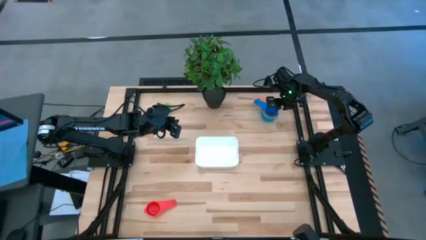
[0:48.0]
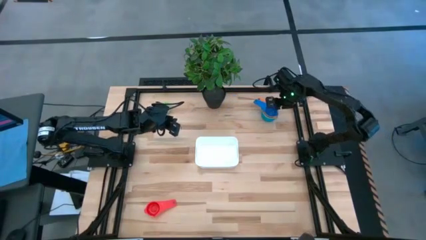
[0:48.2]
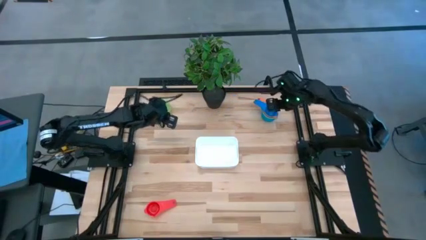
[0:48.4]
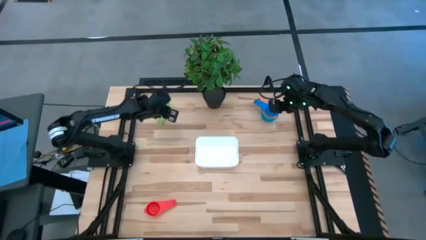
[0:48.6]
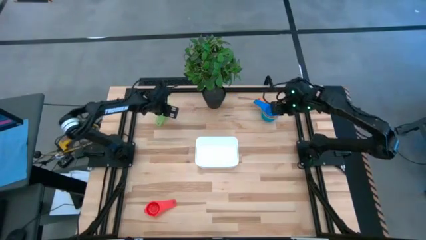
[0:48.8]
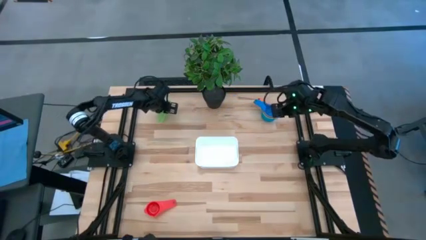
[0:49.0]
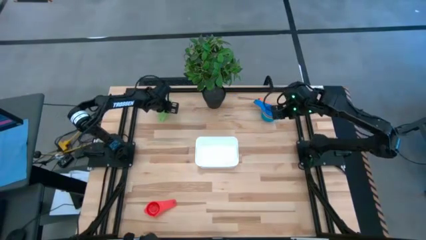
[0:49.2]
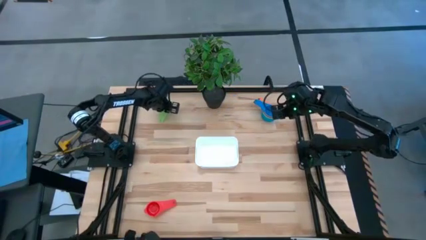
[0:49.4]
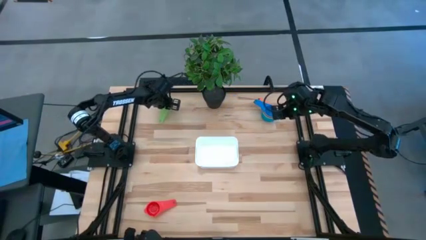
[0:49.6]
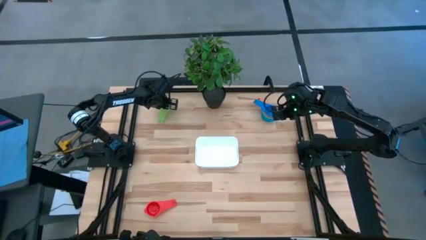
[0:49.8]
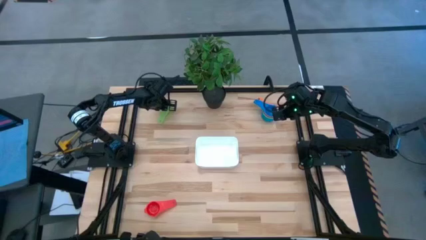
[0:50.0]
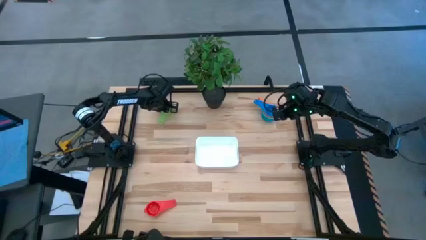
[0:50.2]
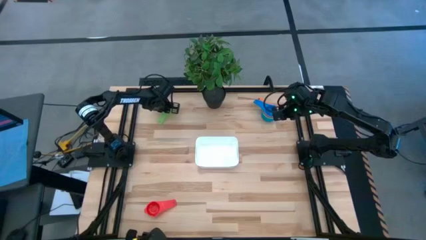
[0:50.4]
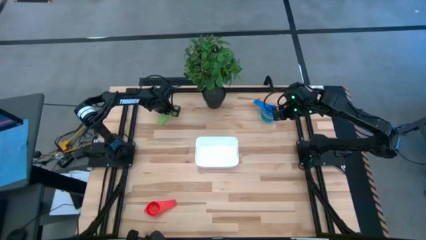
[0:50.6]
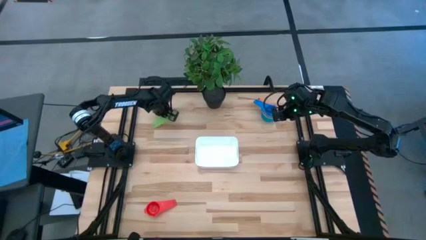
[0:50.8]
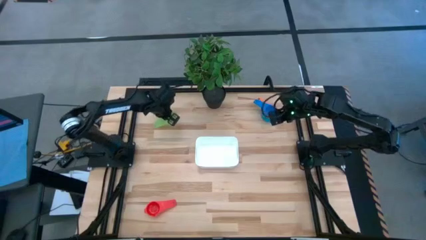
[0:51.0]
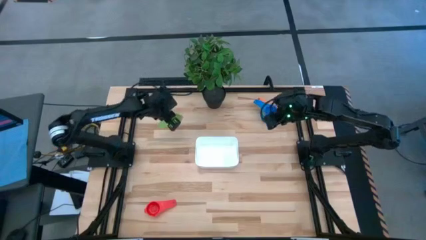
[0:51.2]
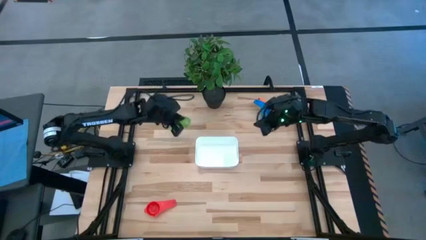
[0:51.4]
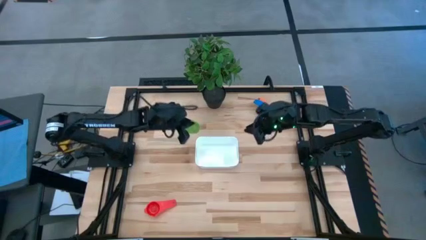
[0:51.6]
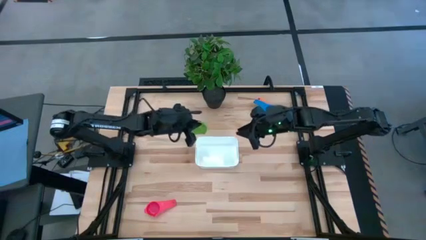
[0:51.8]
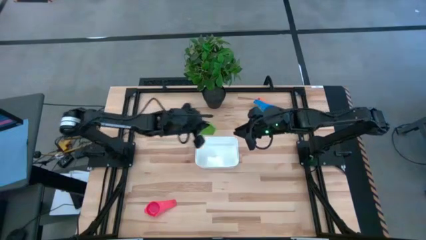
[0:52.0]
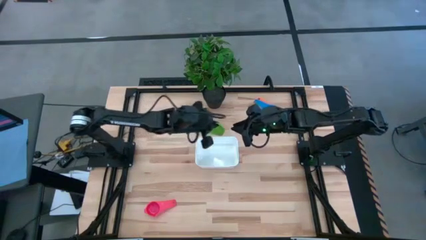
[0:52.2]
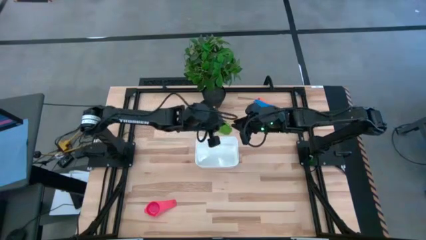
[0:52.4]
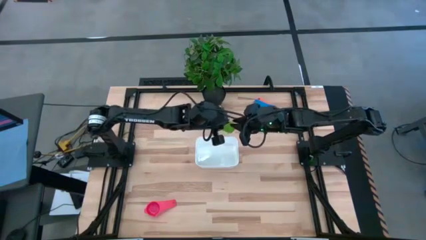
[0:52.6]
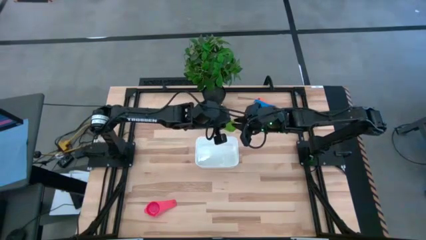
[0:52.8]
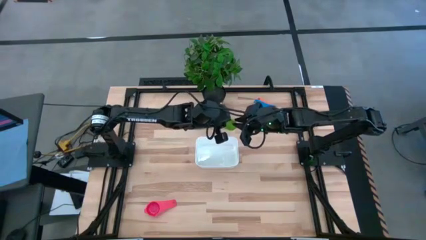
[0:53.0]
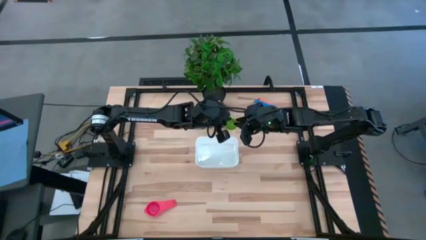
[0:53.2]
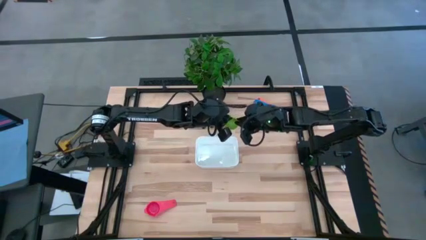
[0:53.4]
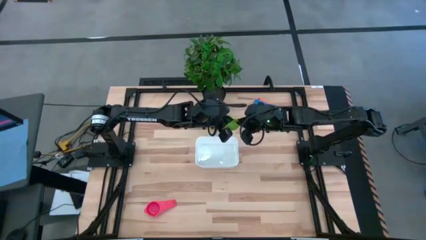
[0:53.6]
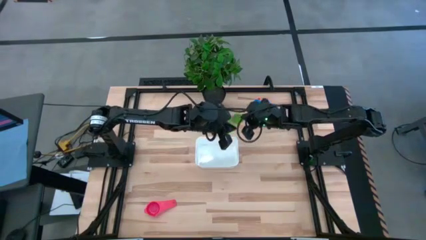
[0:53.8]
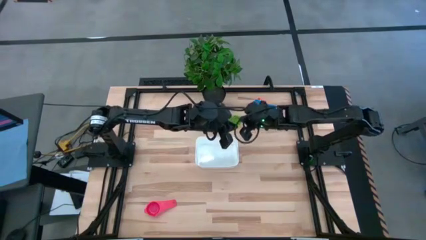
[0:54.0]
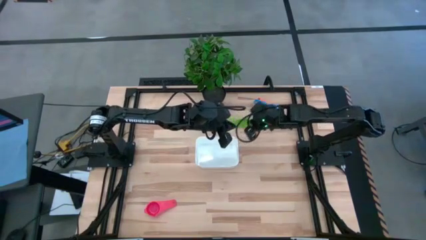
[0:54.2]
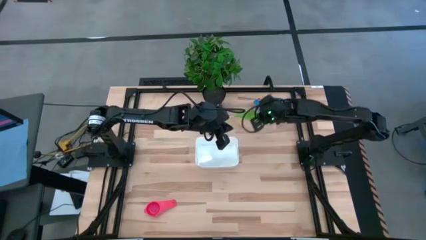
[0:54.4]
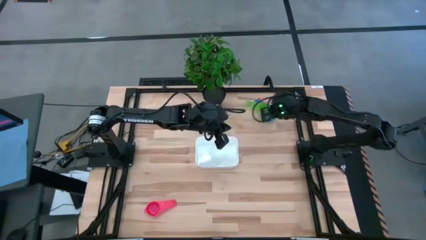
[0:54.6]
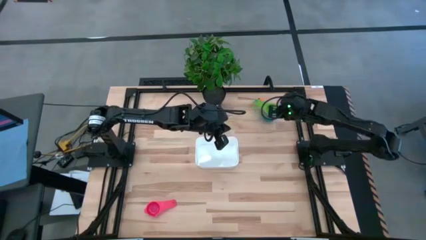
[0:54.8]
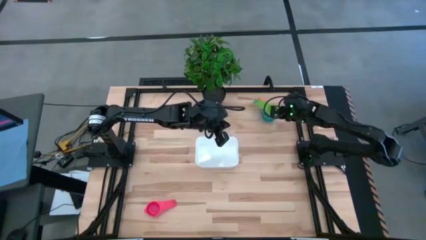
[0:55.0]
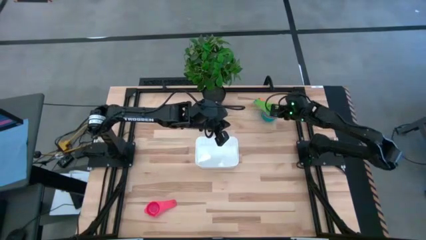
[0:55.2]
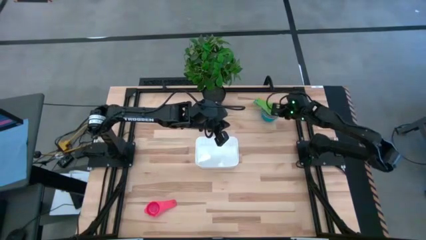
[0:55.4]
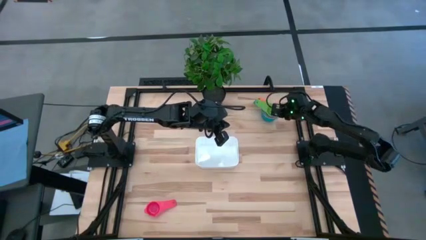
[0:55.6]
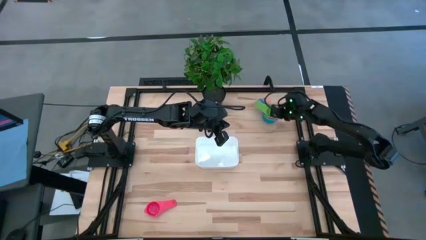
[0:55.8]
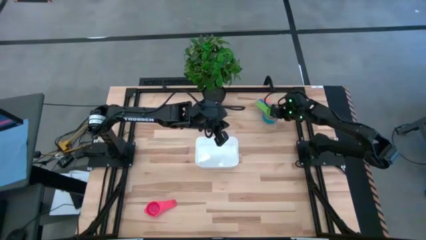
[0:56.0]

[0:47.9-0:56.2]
Task: Nest measuring cups in basket
Stack the red measuring cup on top of the blue measuring cup

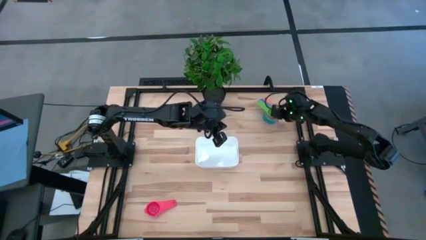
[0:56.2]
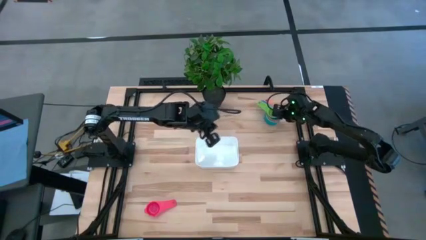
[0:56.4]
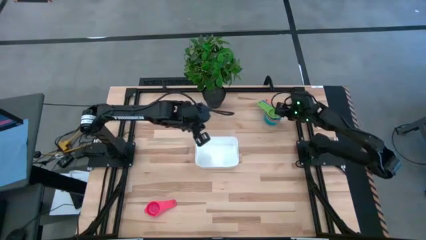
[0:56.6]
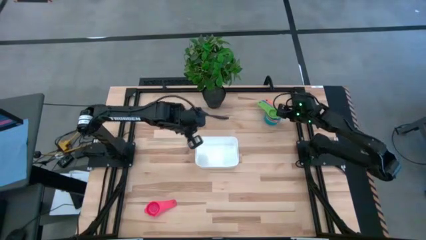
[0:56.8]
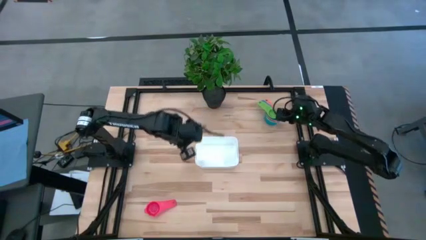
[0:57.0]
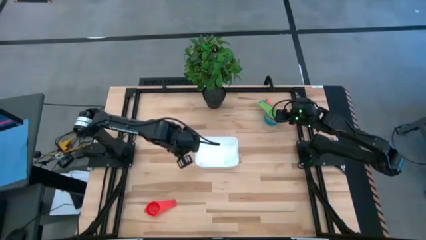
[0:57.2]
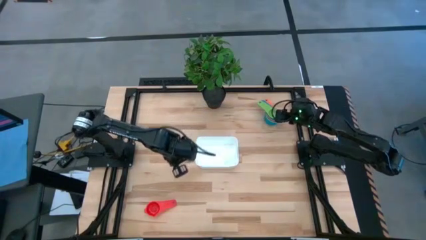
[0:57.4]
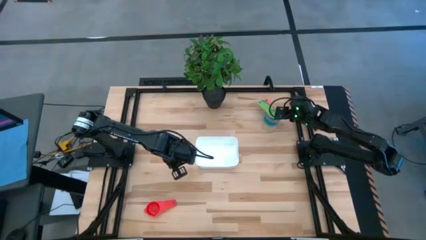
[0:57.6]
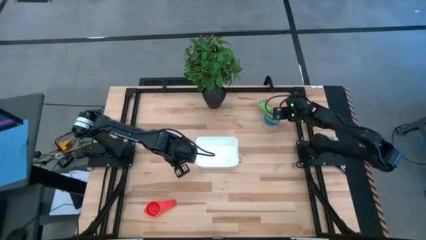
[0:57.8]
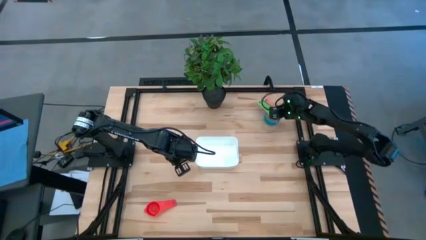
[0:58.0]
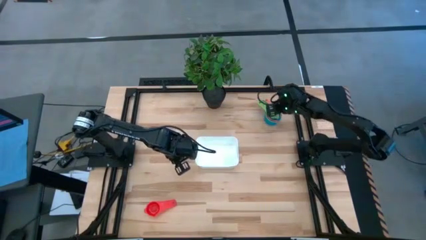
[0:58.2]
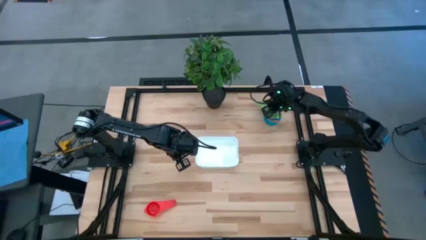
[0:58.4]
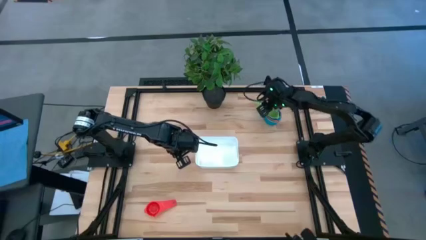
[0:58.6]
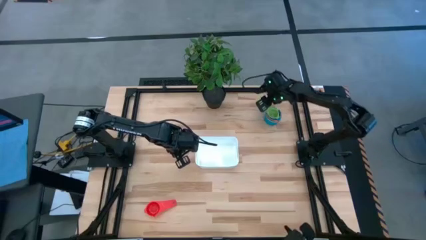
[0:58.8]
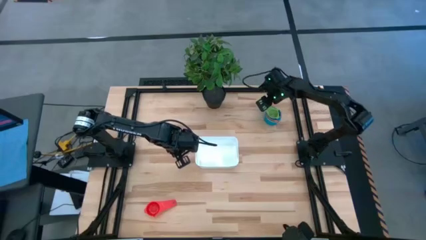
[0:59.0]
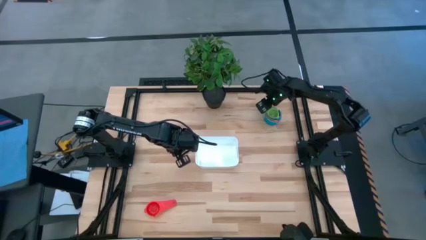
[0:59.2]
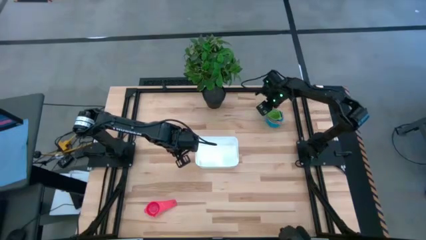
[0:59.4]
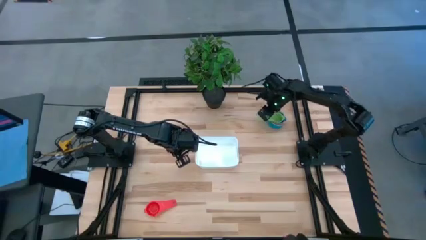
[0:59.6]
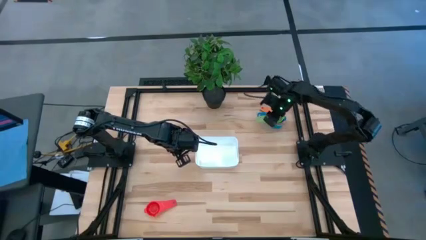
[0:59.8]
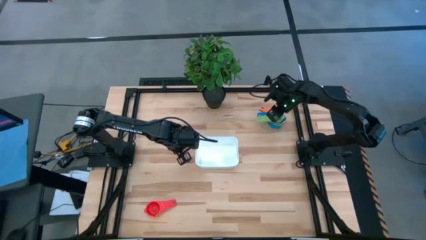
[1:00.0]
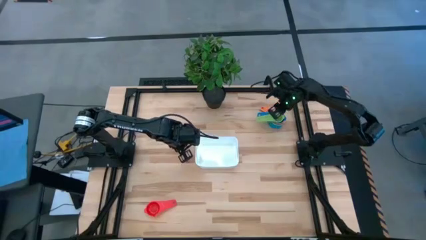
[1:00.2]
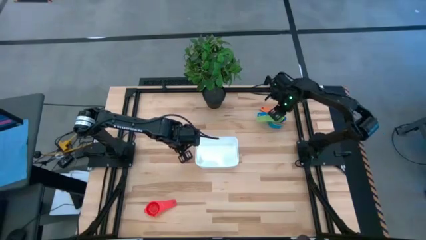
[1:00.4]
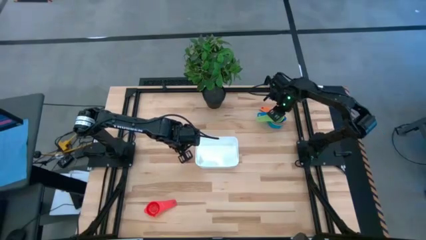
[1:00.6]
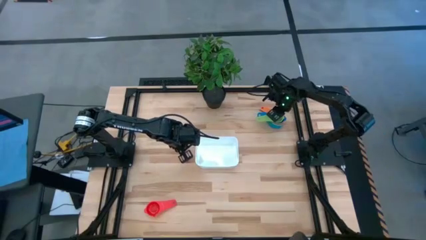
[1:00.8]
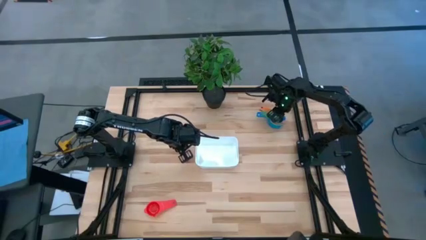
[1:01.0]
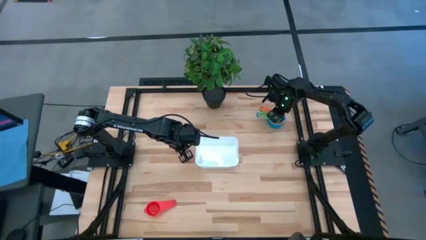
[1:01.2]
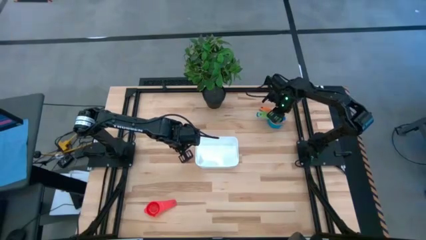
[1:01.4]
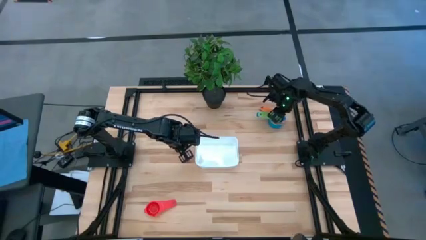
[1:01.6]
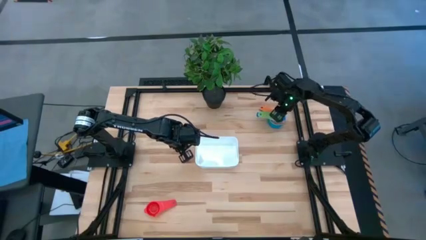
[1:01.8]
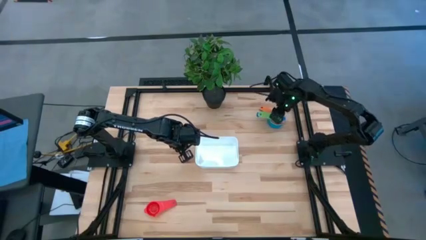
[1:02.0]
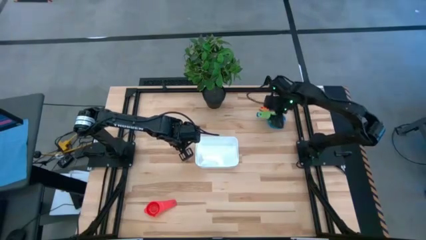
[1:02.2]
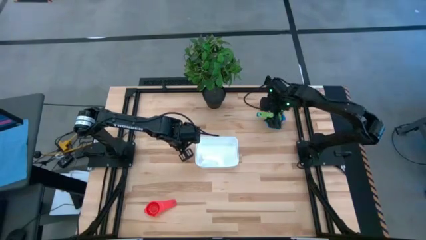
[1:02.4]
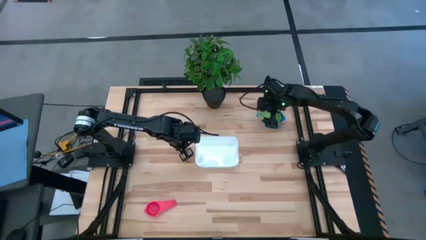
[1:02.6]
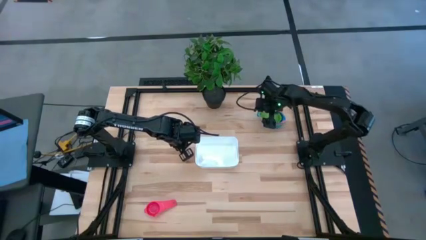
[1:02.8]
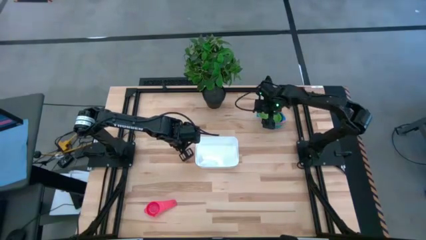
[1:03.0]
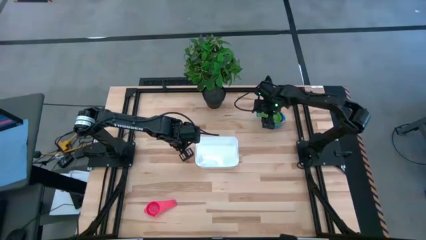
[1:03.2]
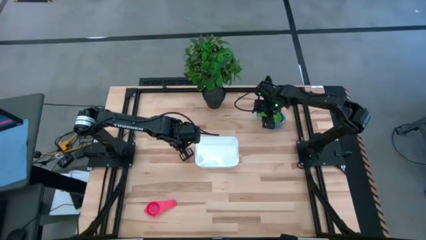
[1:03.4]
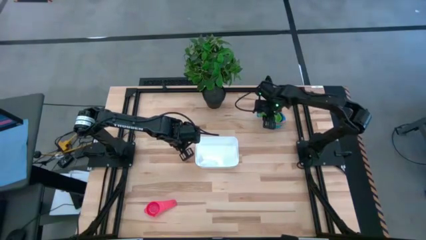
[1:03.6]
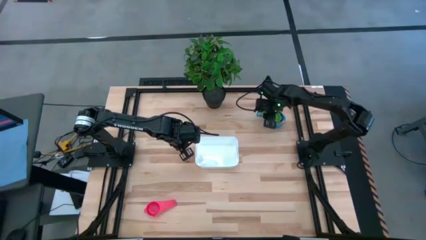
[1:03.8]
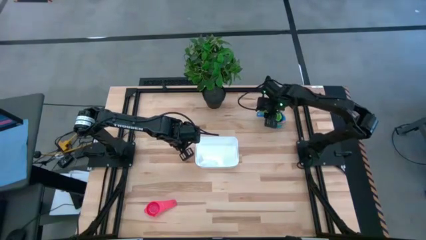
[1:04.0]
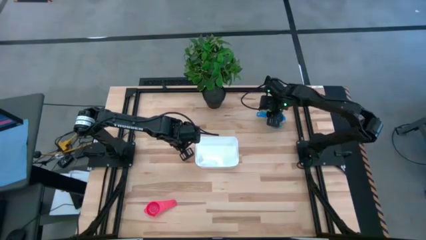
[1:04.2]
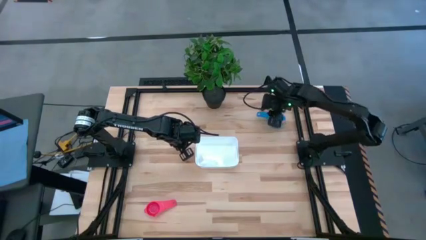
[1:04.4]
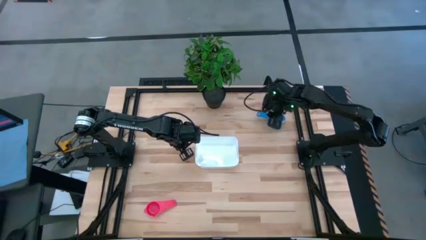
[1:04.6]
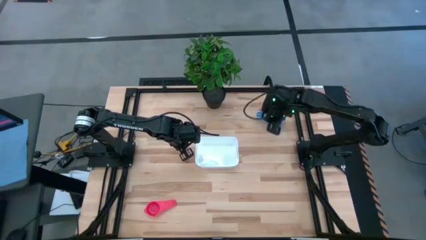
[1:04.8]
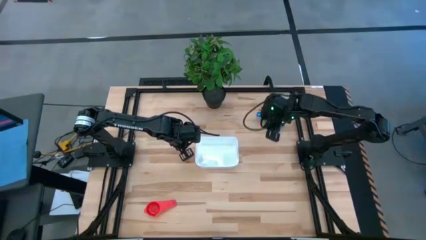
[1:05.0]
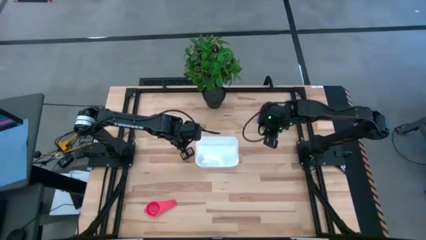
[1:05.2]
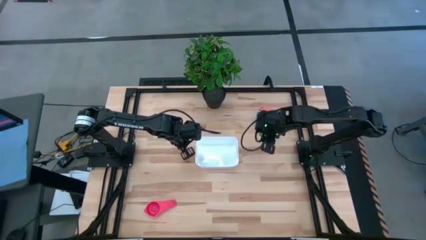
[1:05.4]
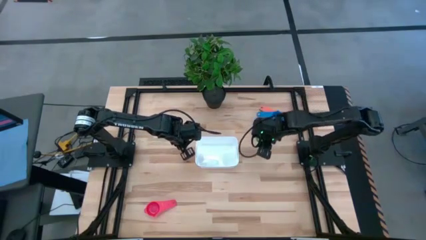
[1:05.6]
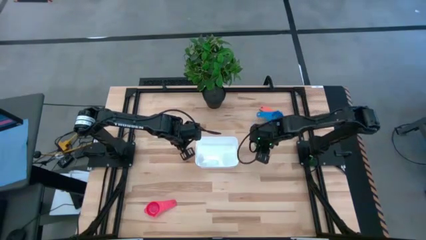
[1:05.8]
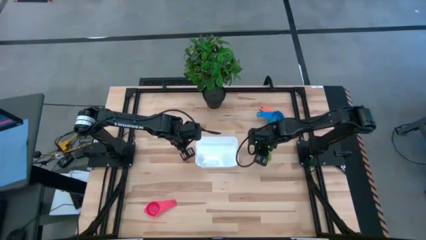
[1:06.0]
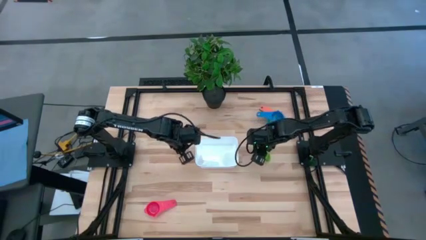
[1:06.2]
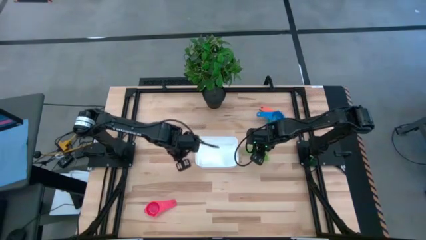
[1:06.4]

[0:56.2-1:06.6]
Remove the green measuring cup from the blue measuring cup
